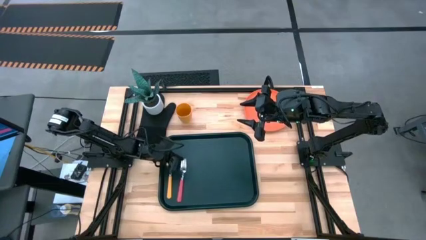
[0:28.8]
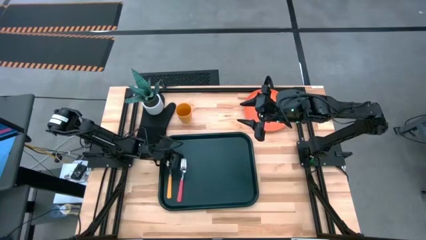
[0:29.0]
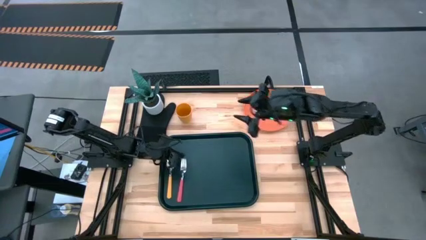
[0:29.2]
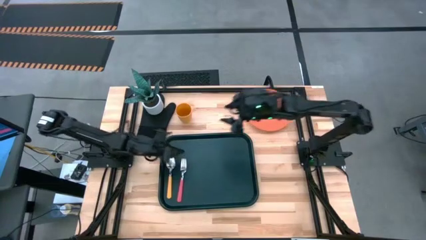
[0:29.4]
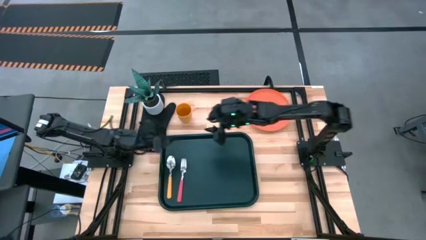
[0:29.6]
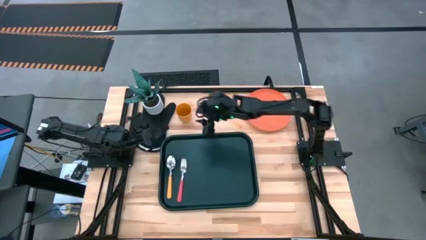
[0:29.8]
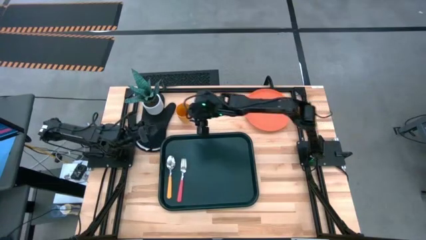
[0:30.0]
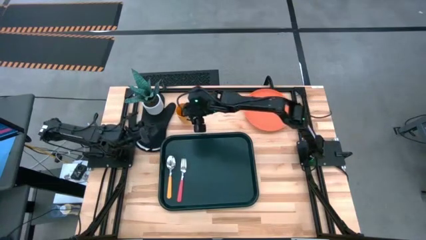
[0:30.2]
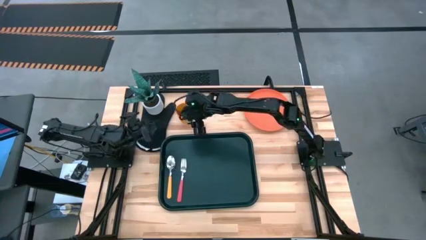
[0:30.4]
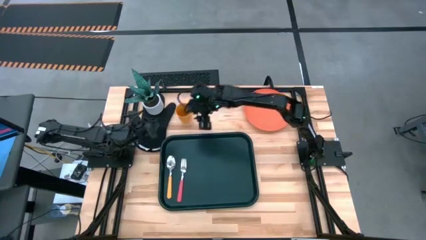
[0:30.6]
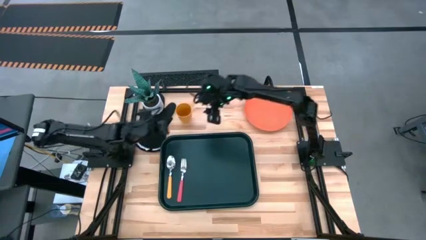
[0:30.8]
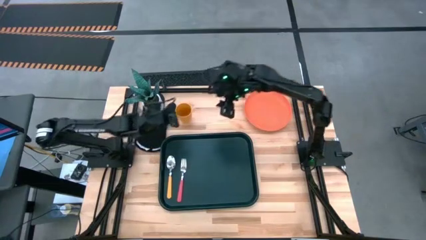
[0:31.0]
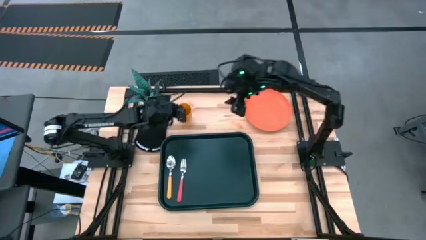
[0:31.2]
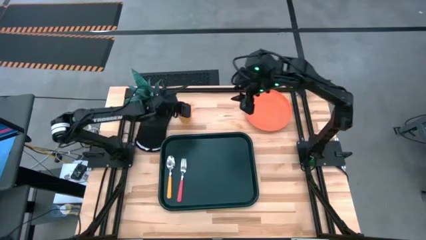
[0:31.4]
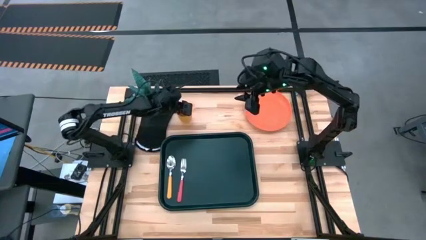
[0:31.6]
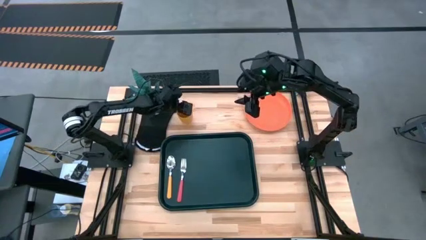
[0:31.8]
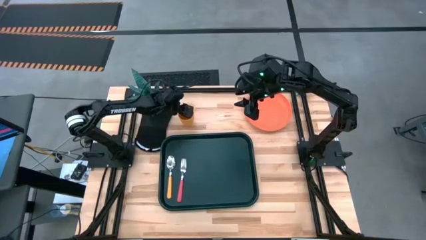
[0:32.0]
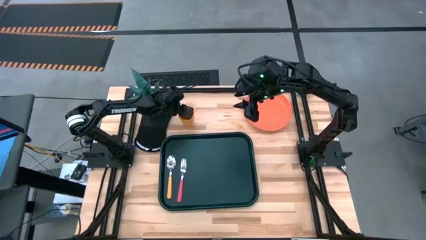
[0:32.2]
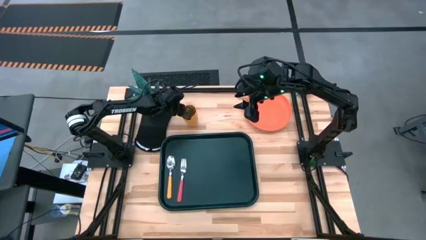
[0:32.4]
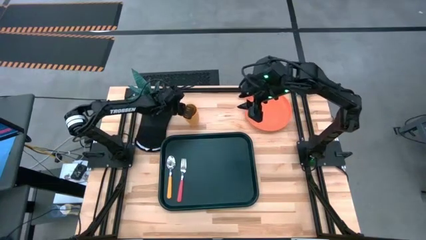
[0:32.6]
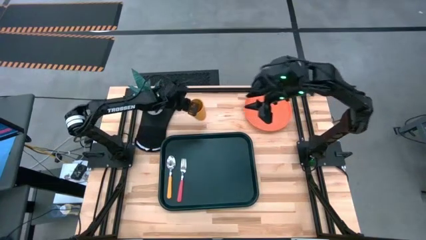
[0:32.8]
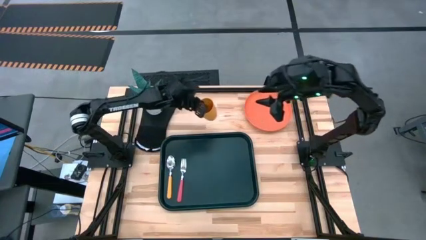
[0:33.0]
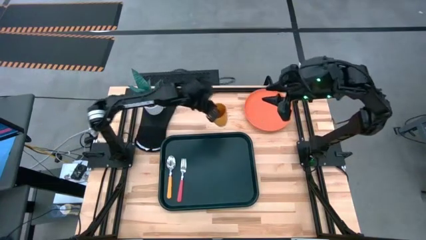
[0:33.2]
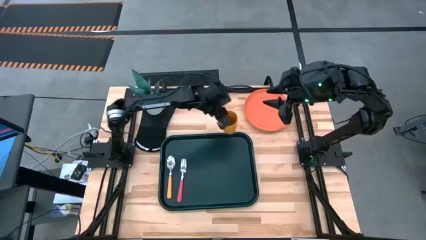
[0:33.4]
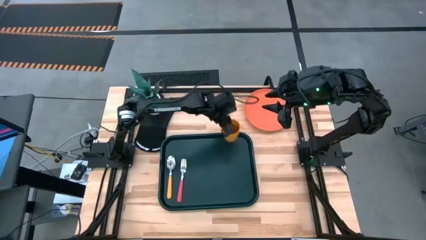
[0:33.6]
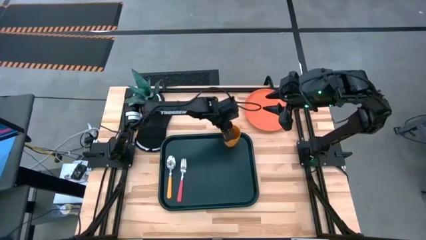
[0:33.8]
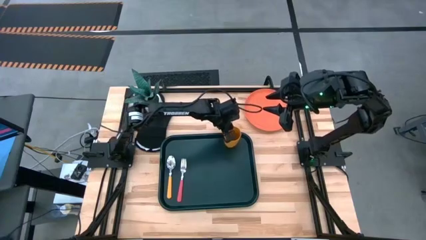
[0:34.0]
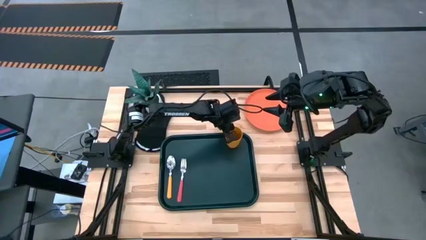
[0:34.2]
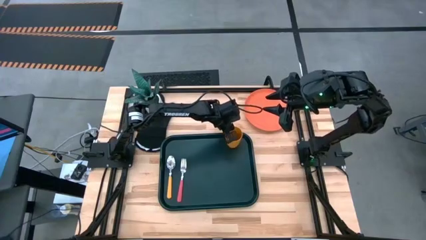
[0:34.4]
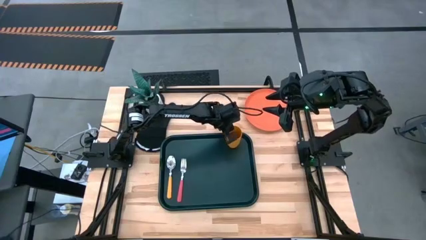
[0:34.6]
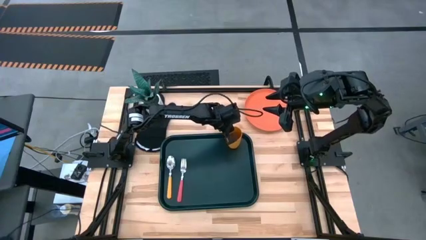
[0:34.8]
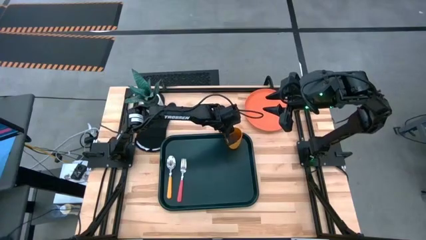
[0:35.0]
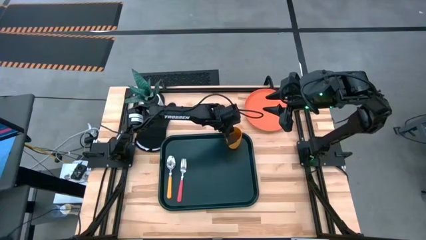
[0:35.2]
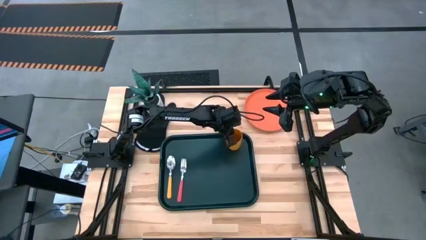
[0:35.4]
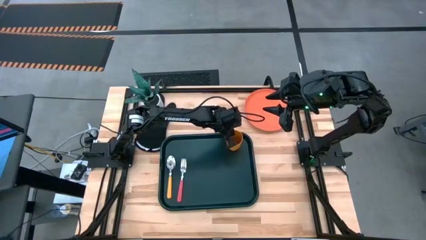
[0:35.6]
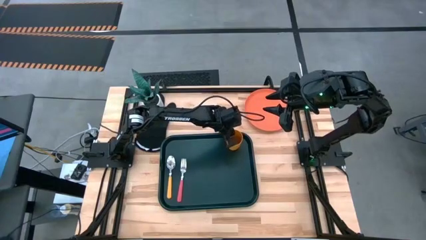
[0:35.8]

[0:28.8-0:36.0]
Task: Pick and place plate/cup/fork/spoon on tray
Put the yellow cup on the top right of the black serving tray

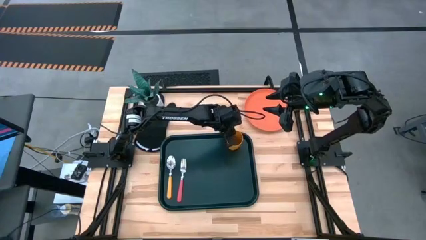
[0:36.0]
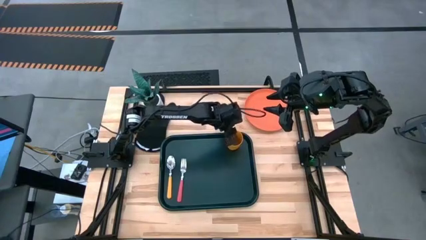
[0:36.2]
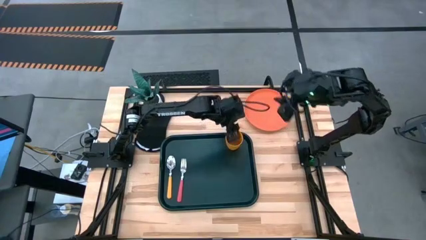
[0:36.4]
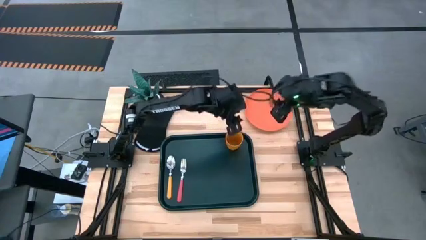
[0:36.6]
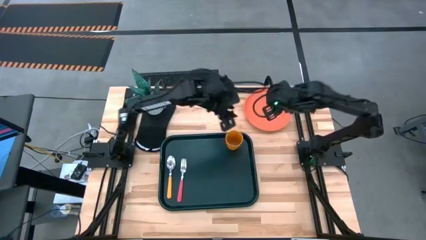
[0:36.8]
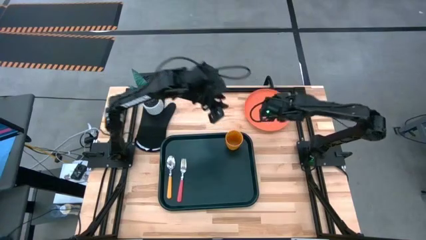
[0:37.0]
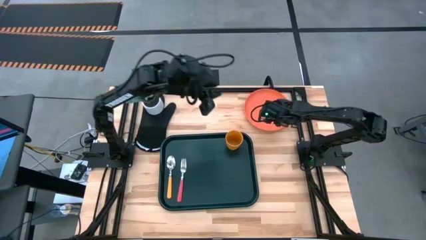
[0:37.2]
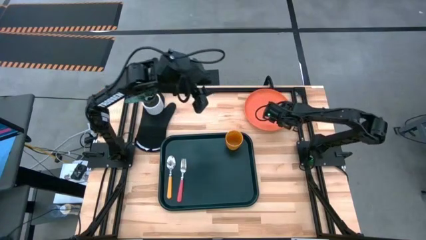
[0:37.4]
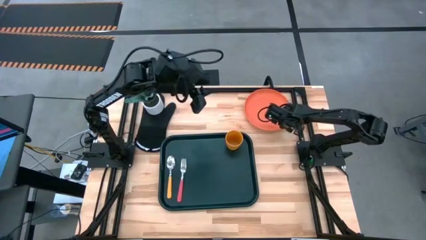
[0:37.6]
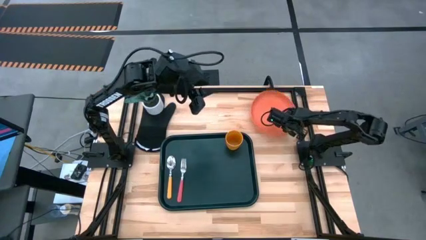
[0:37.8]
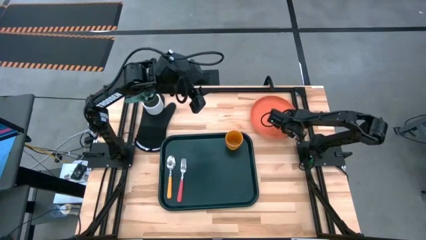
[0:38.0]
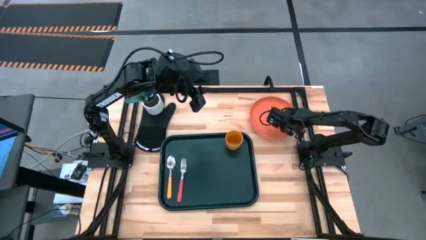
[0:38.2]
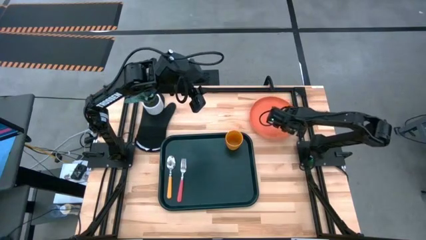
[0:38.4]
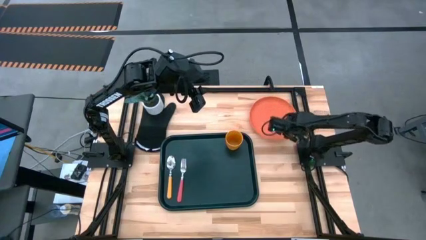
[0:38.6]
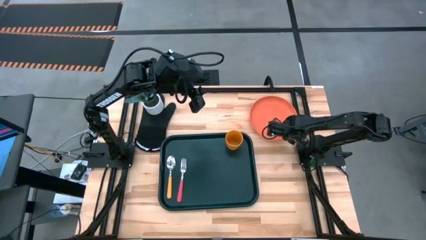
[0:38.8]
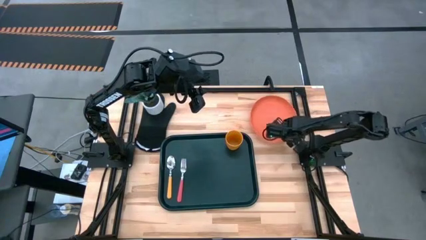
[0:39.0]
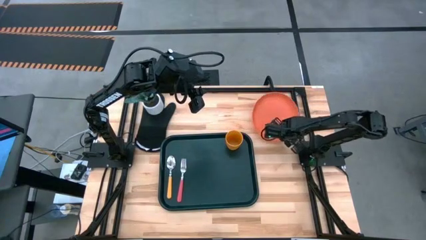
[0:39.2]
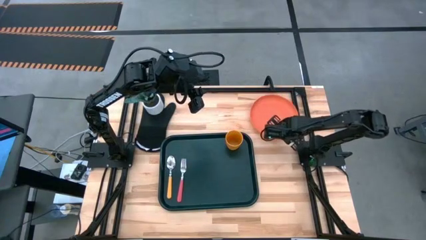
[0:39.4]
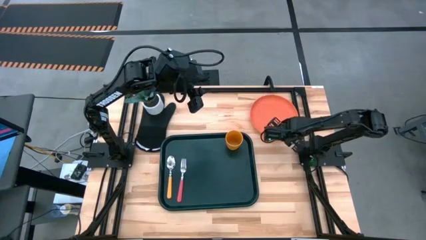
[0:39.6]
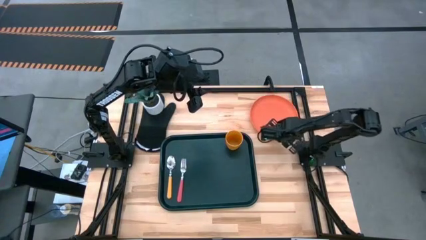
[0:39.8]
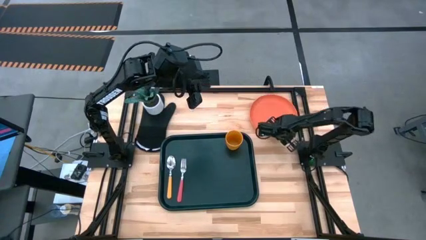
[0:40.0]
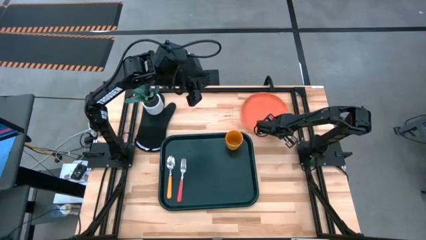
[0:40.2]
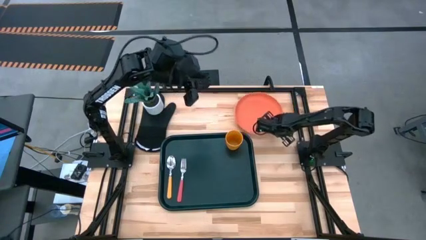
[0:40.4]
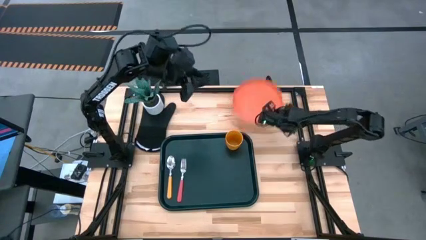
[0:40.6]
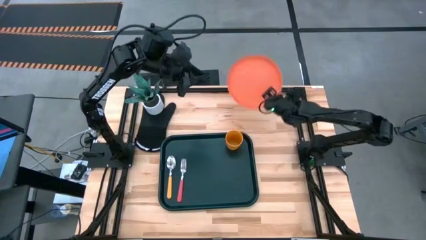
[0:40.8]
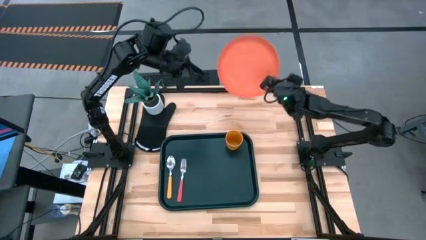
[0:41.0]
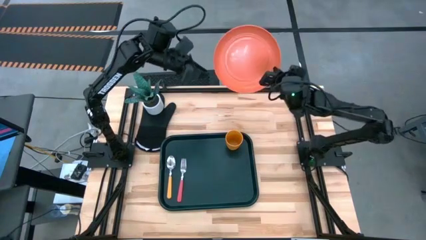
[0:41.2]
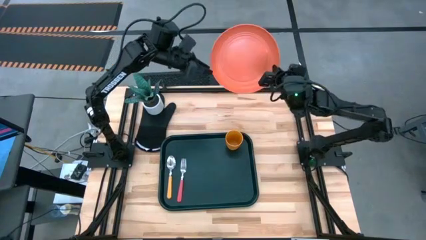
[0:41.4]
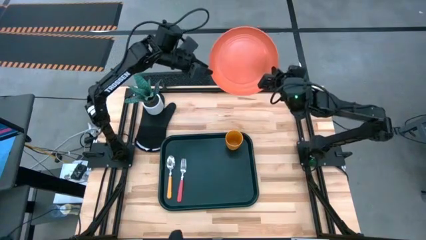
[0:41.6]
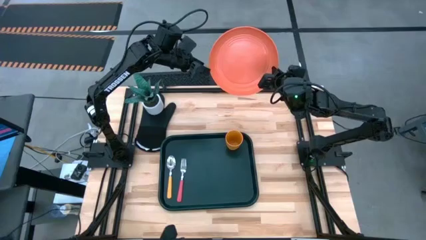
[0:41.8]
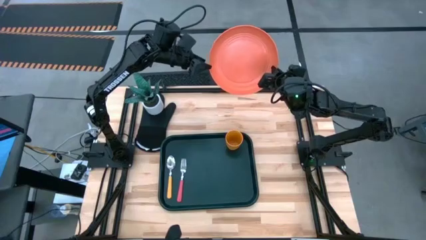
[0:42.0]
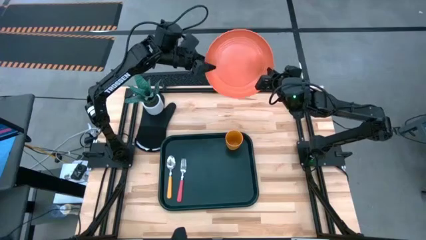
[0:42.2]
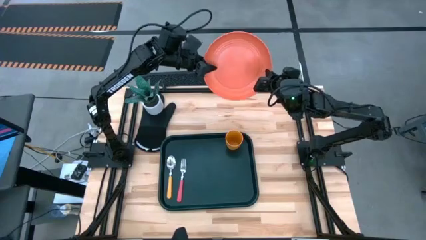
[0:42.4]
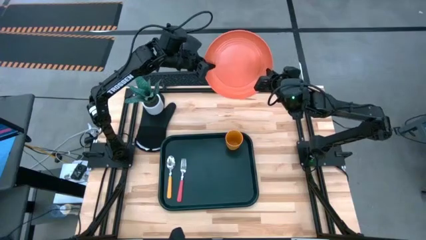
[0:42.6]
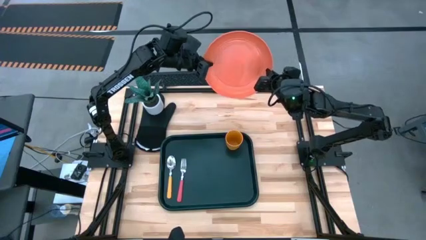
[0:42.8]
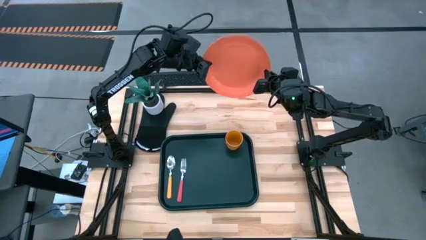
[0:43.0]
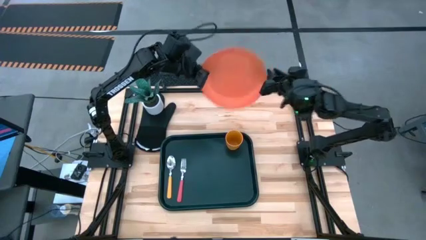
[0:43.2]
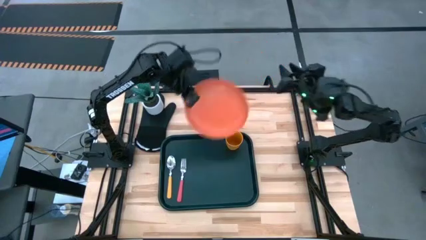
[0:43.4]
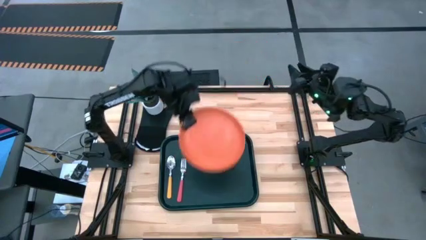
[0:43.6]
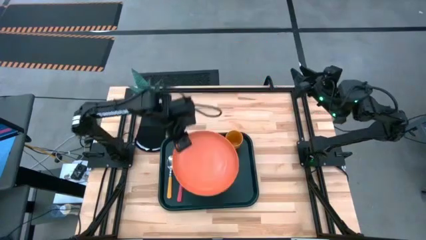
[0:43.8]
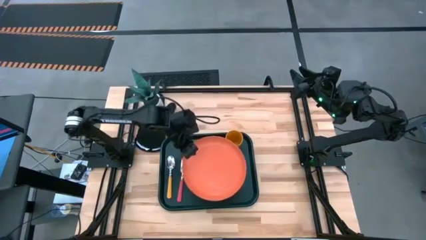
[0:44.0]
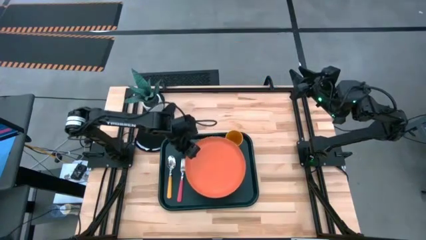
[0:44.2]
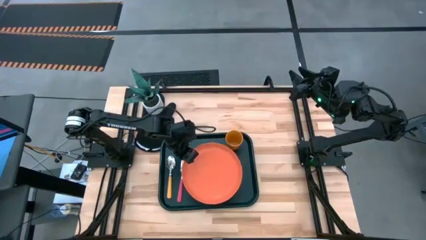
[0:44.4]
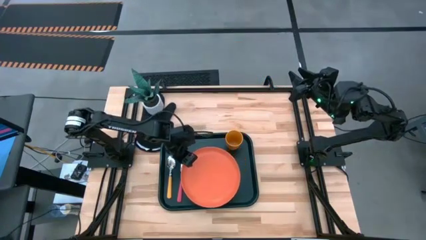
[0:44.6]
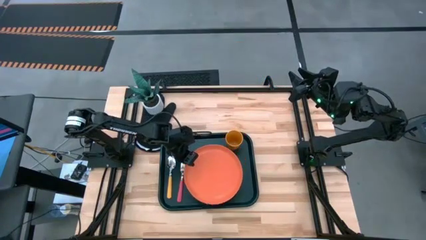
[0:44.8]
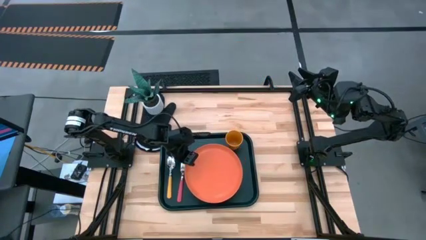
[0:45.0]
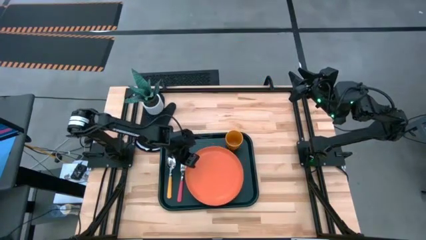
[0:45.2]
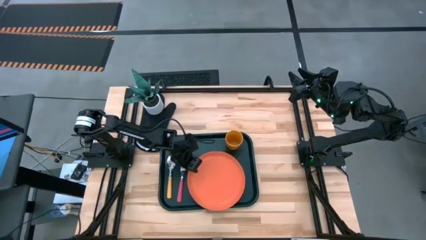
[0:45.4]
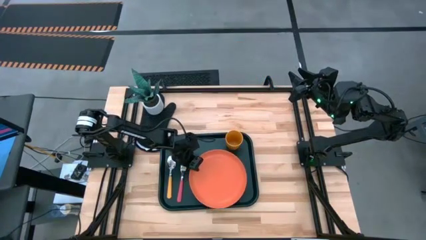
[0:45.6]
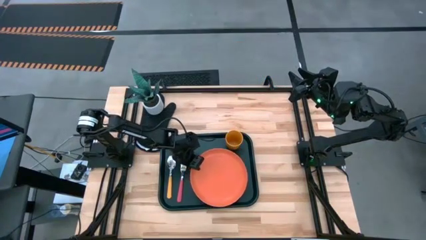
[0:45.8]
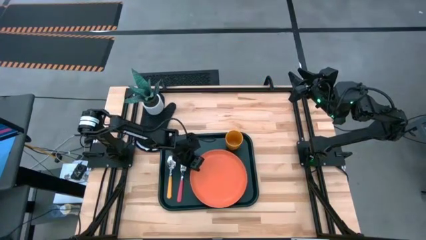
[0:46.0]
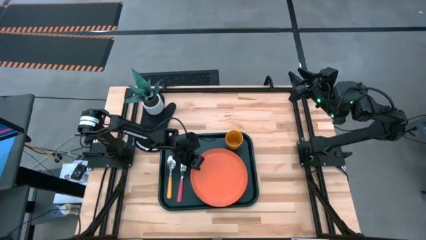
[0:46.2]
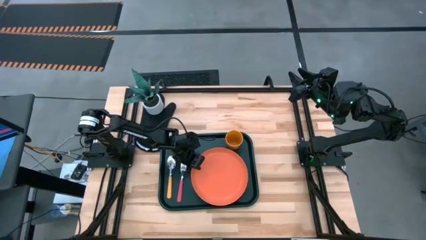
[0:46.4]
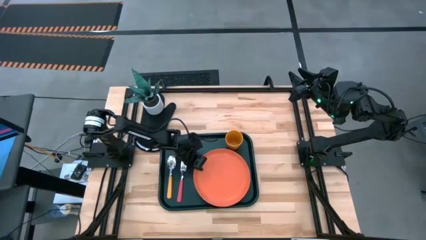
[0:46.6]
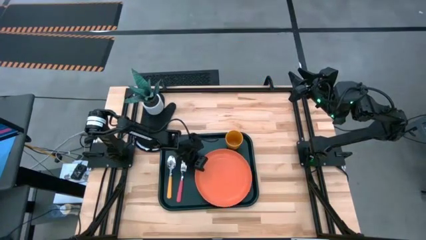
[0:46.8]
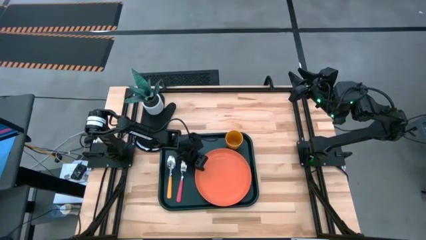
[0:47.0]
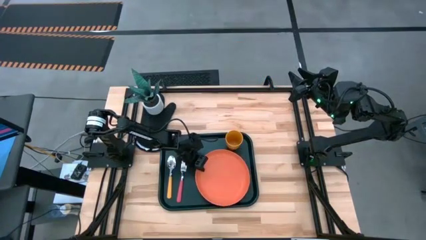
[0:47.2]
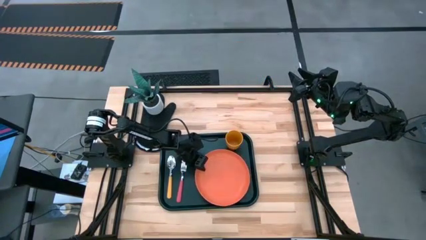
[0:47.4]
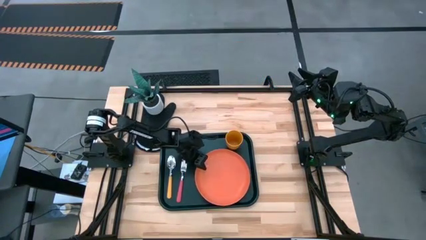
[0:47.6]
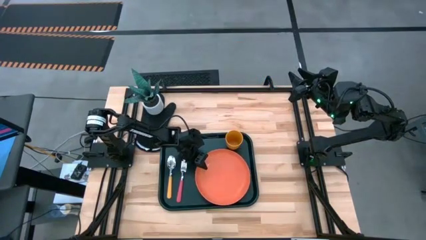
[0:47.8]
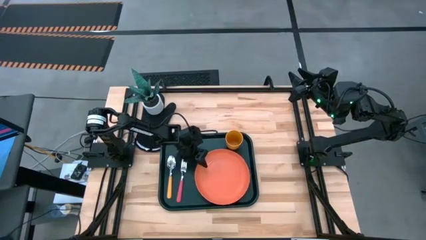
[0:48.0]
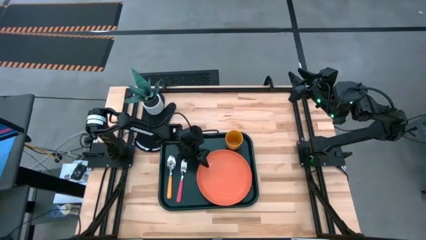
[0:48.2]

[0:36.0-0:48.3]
Put the orange plate at the bottom of the yellow cup on the black serving tray
